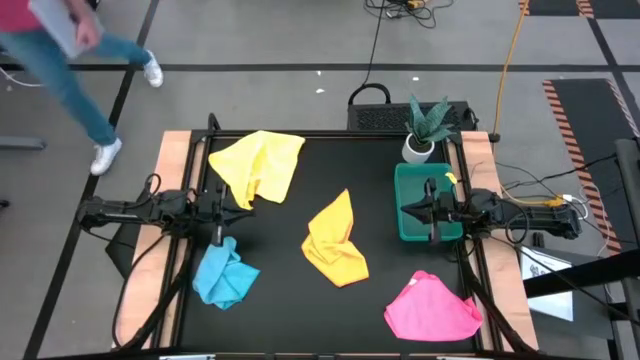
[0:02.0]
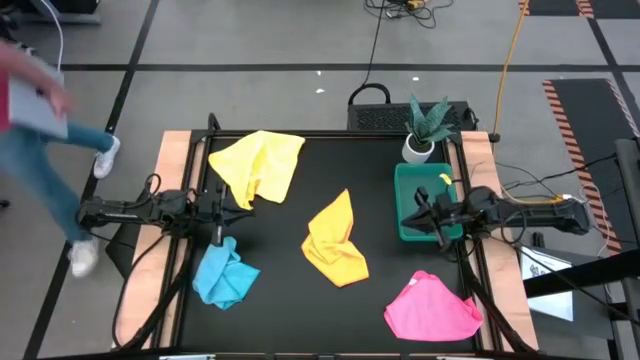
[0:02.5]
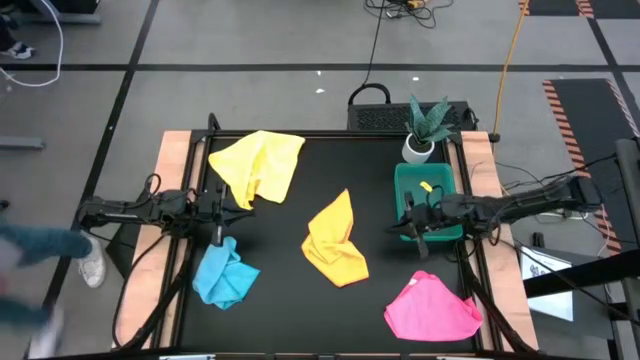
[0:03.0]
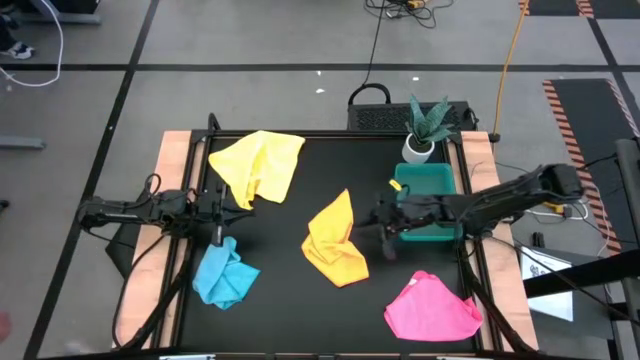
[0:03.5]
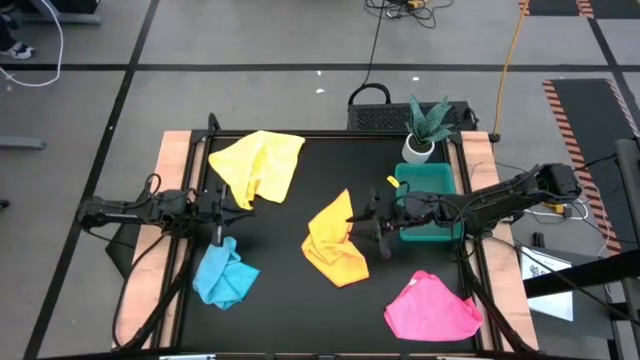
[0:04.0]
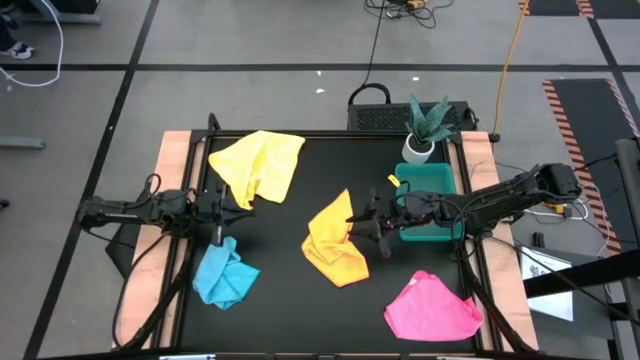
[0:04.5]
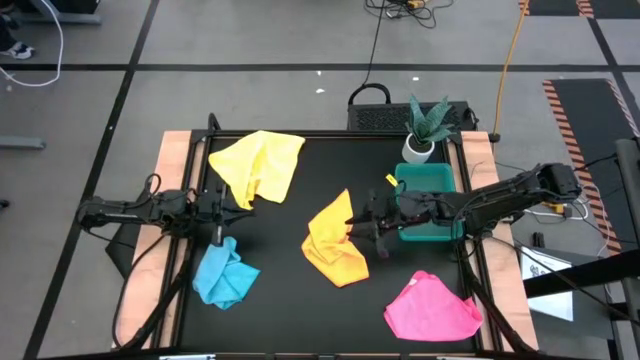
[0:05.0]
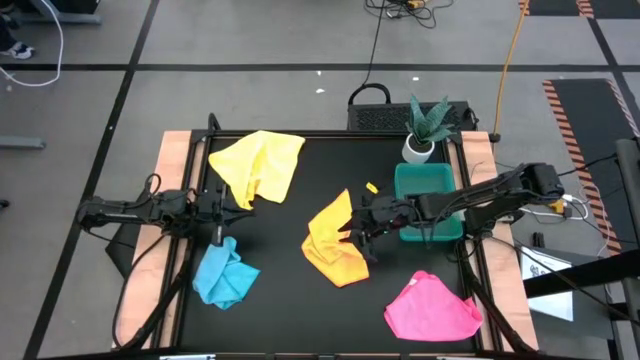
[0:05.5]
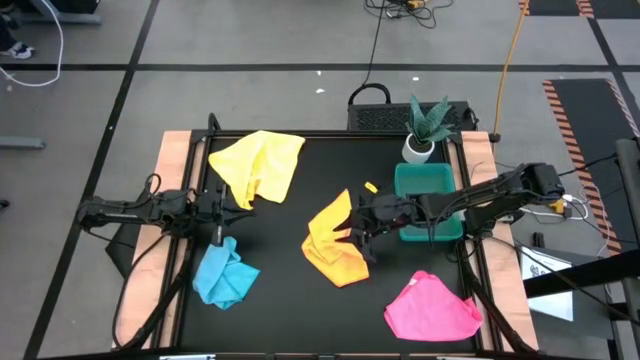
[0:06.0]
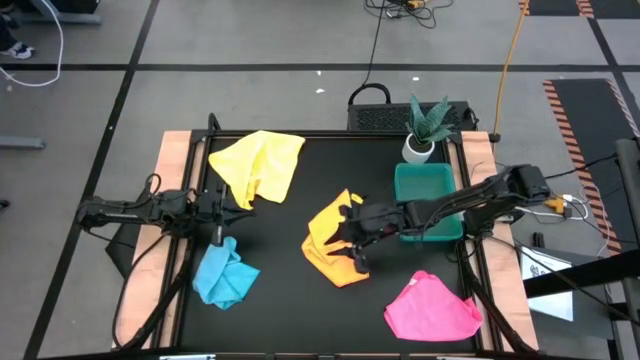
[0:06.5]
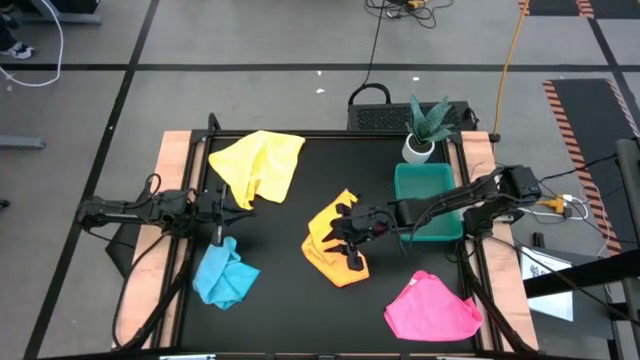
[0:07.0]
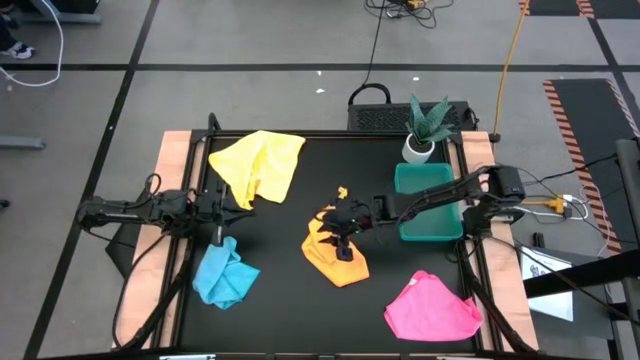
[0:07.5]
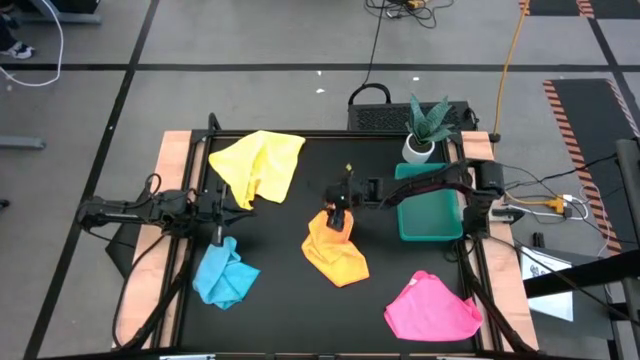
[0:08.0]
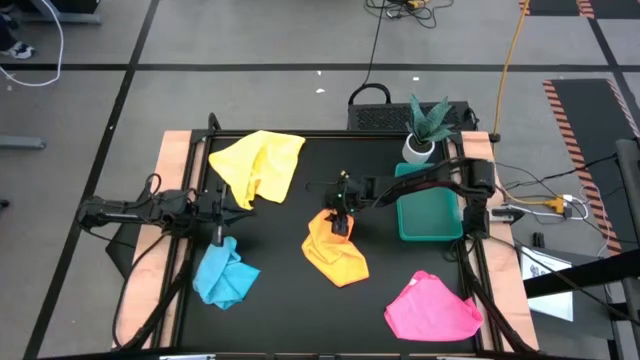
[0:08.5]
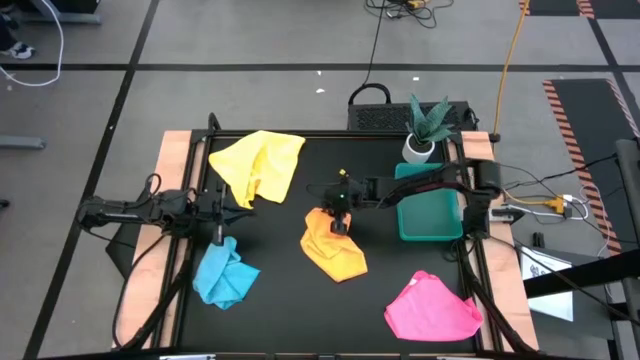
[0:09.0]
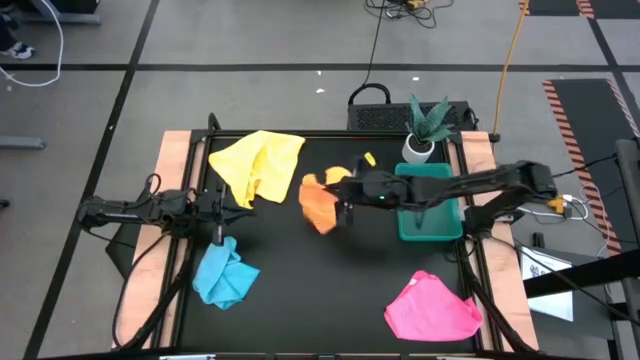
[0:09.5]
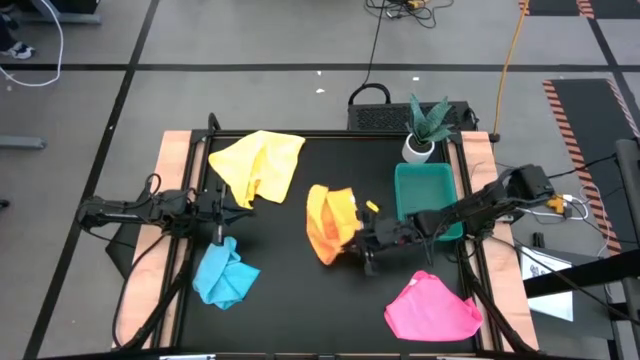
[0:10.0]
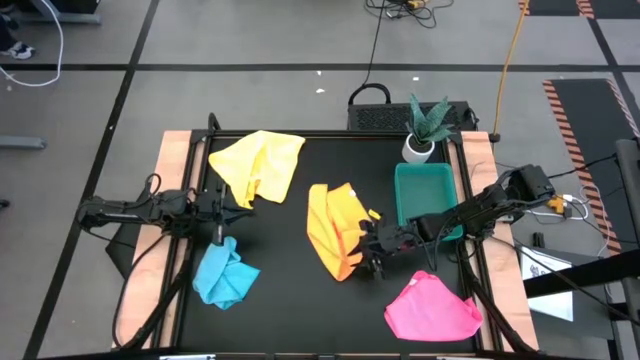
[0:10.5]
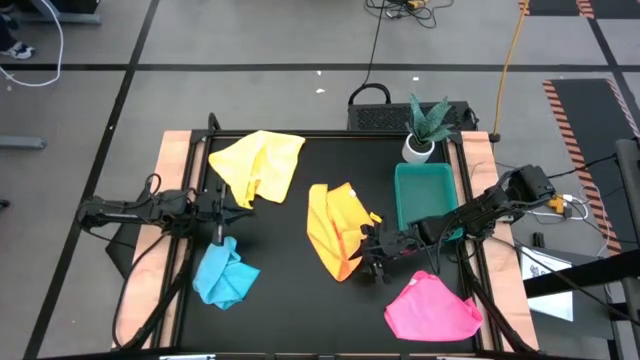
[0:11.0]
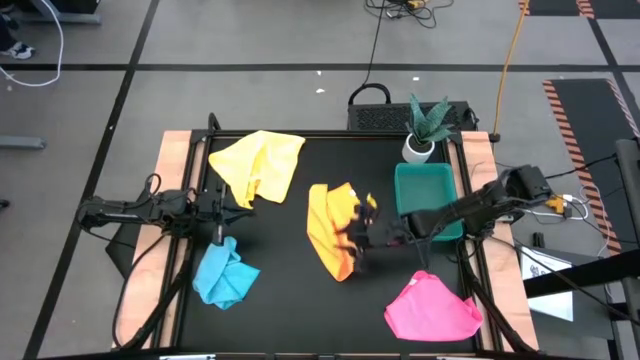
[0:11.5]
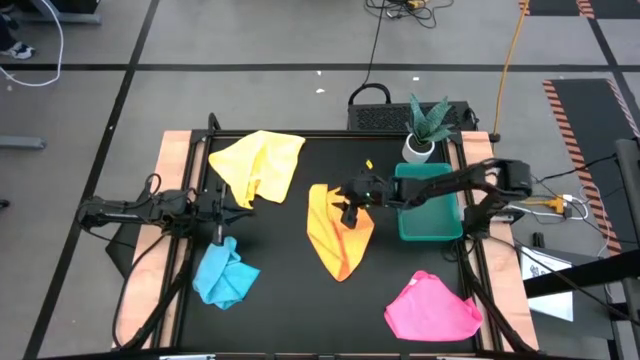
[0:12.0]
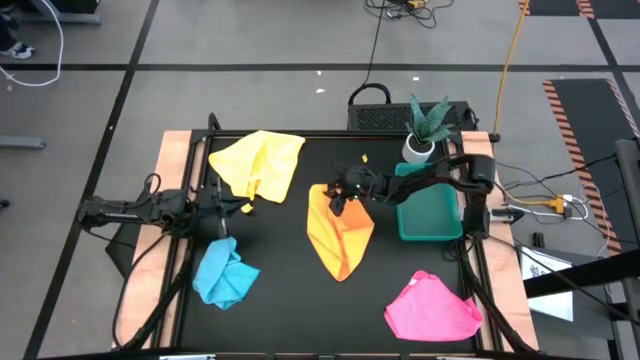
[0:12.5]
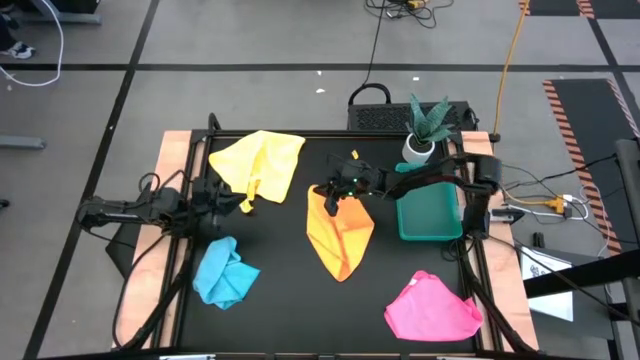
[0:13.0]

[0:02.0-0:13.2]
Task: Fold microfiber towels
Fold the orange microfiber cloth

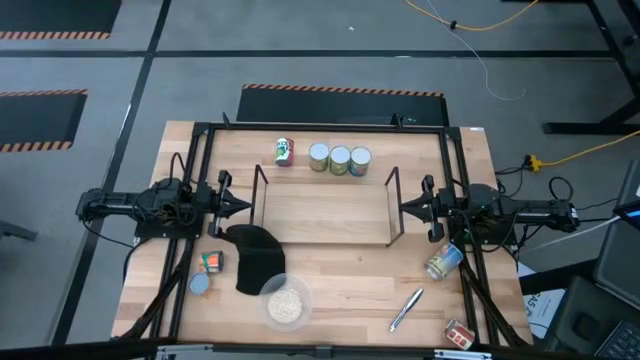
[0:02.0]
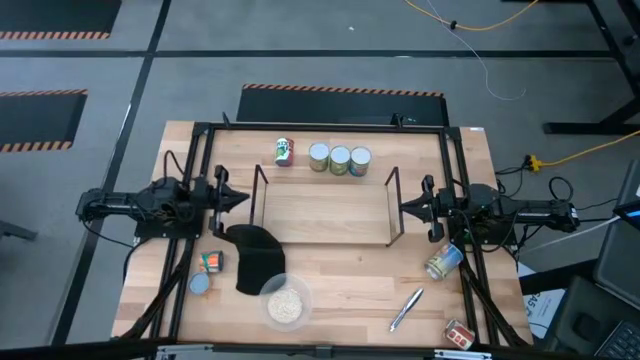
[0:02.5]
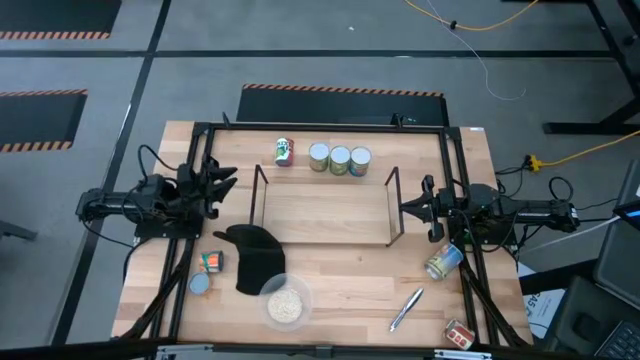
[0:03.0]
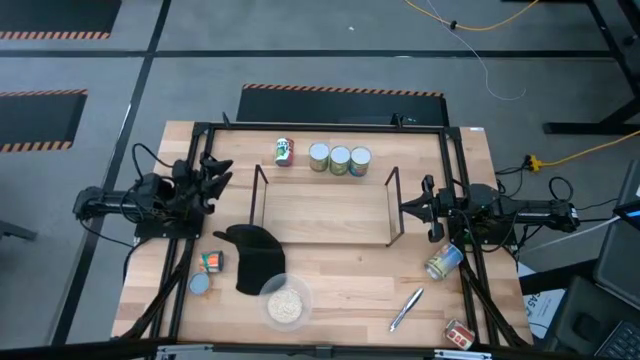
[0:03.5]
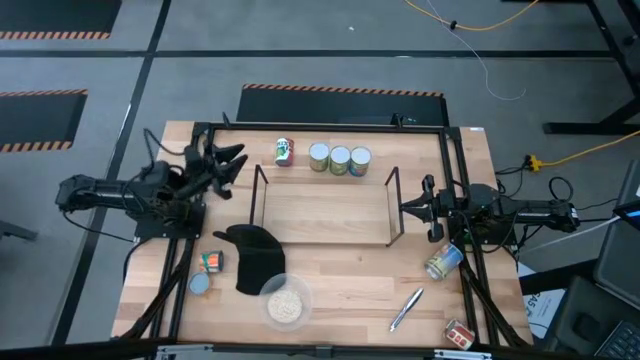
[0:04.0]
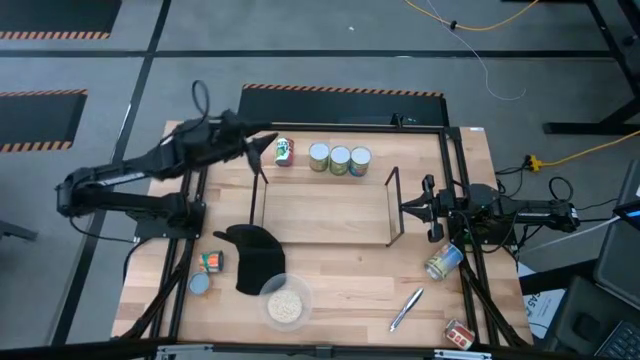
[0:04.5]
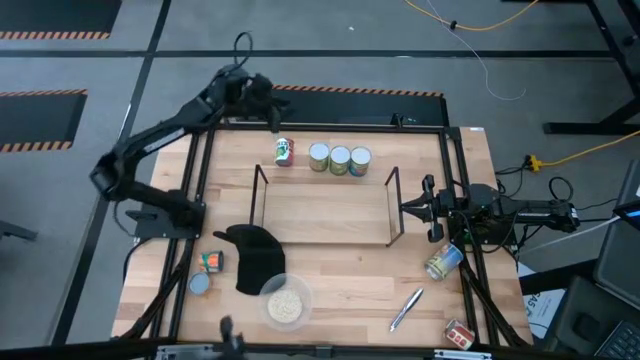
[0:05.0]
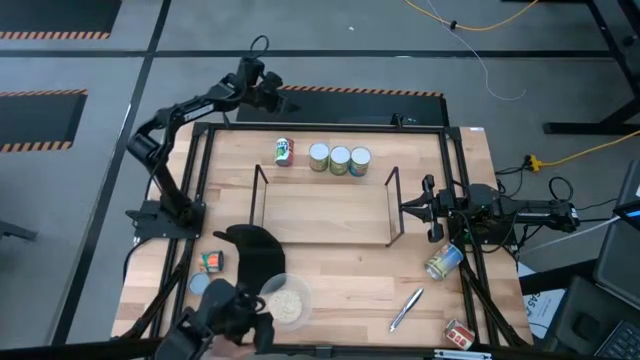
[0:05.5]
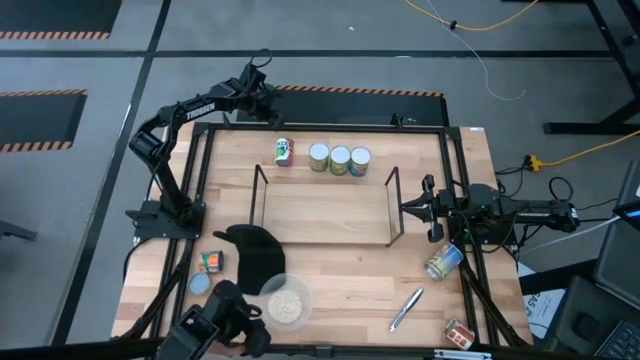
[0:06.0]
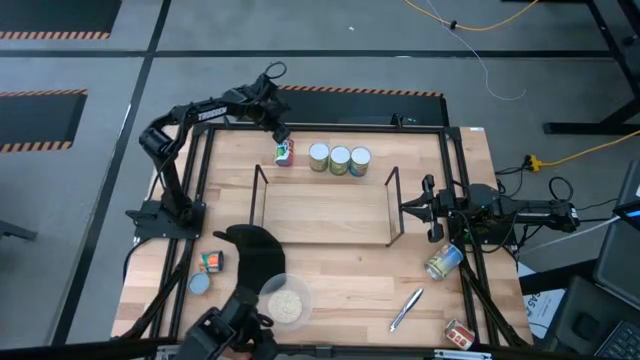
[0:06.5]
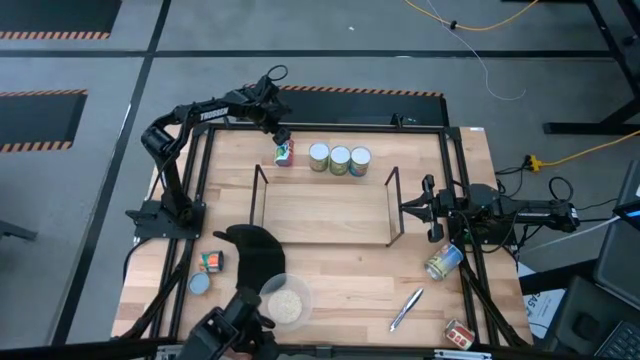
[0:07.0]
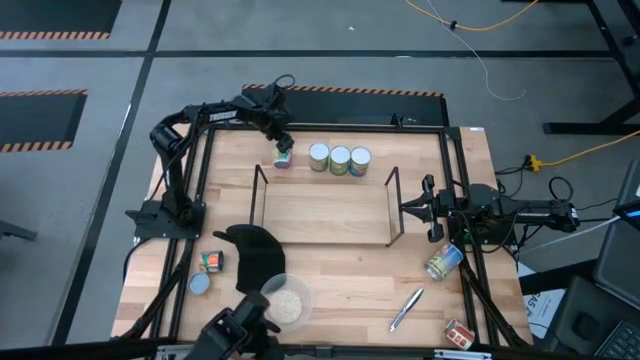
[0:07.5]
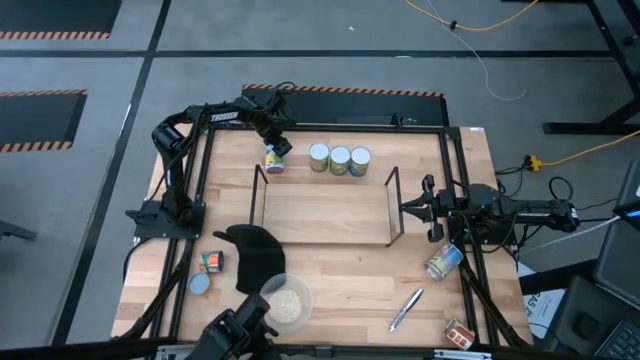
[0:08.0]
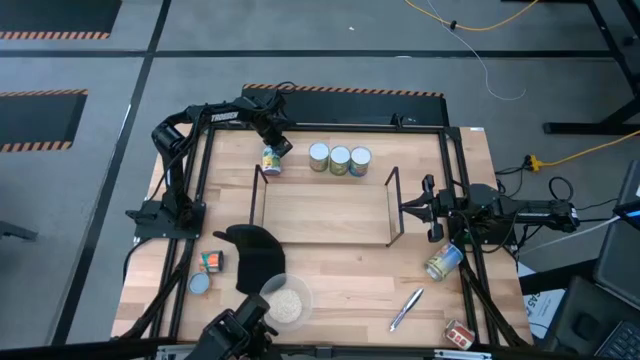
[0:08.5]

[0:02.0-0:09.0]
Task: Pick and place cans onto a shelf
Put the canned mixed fruit on the shelf
